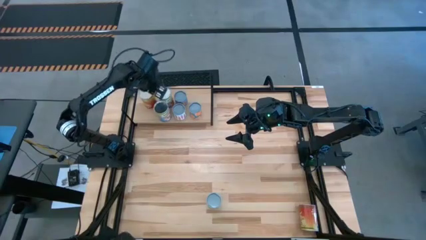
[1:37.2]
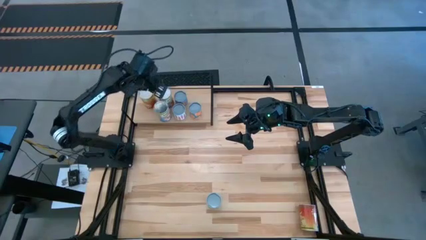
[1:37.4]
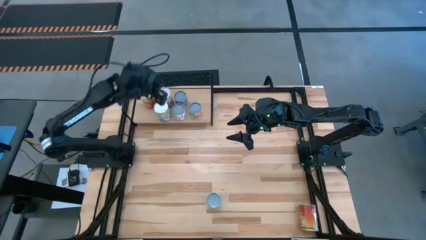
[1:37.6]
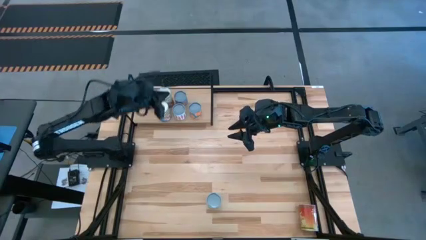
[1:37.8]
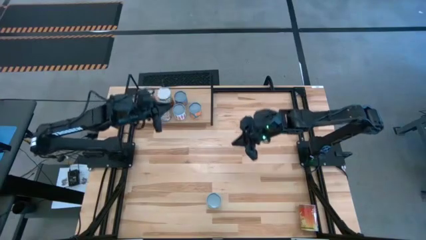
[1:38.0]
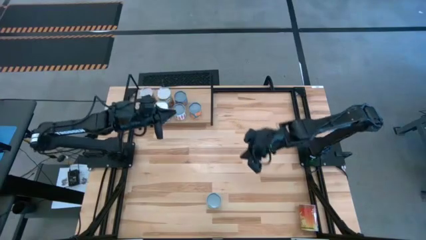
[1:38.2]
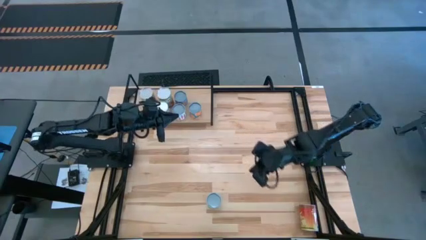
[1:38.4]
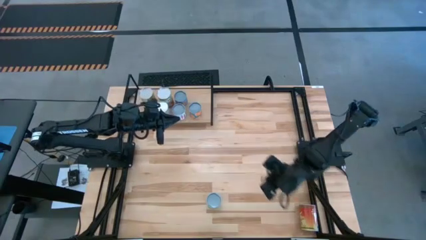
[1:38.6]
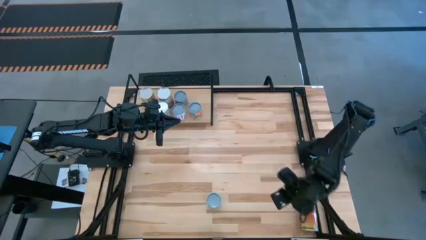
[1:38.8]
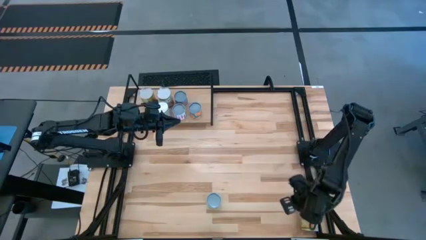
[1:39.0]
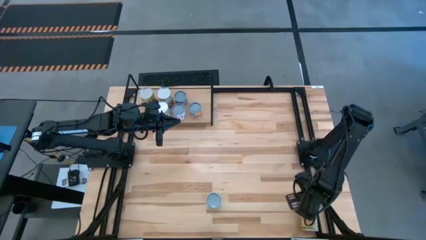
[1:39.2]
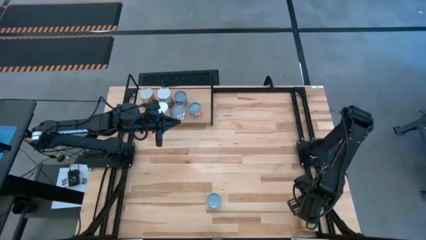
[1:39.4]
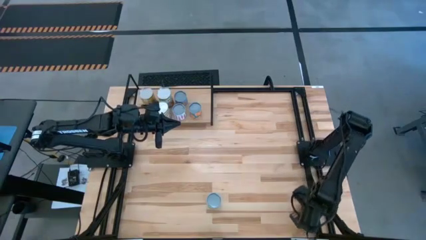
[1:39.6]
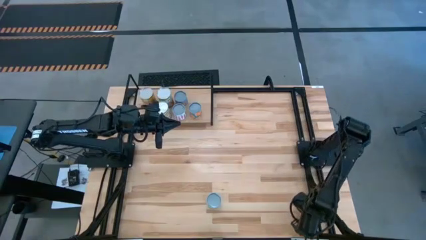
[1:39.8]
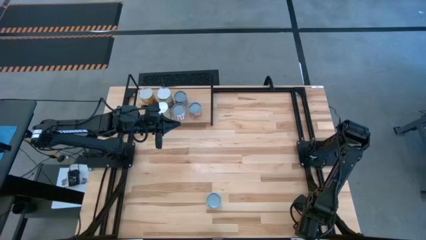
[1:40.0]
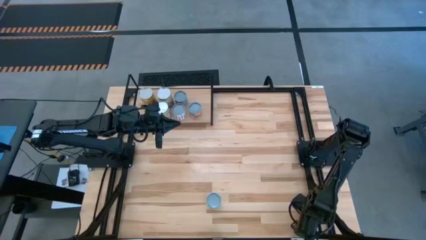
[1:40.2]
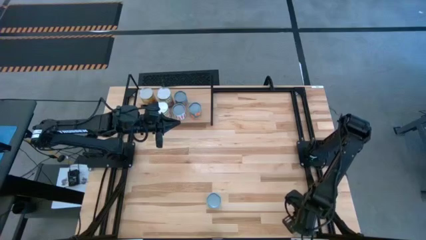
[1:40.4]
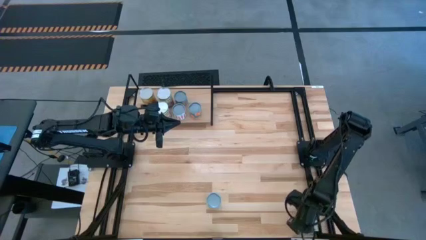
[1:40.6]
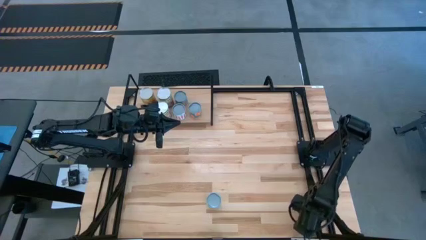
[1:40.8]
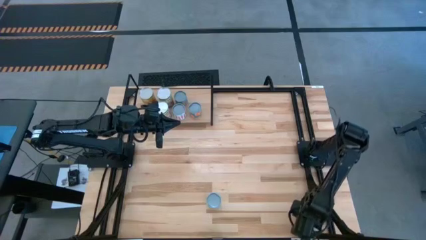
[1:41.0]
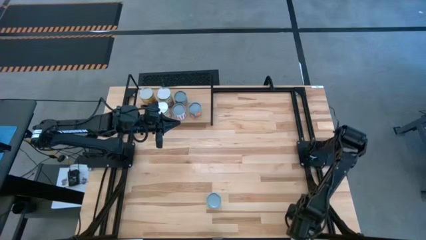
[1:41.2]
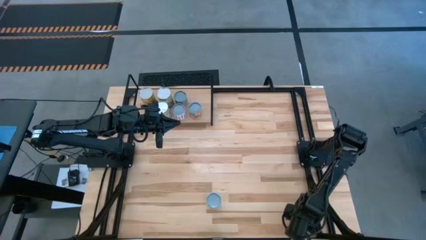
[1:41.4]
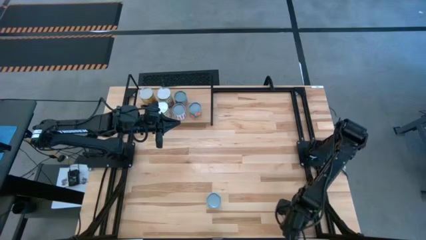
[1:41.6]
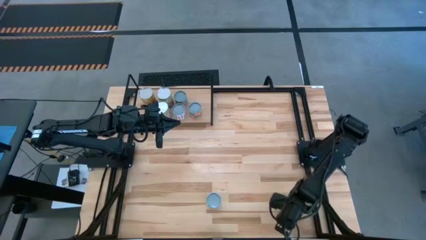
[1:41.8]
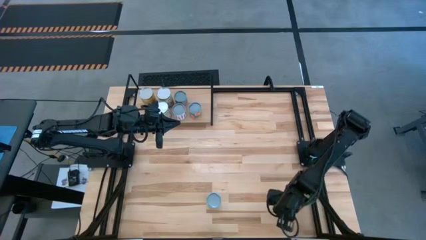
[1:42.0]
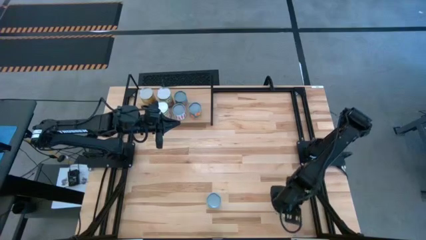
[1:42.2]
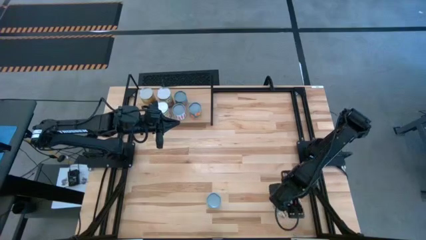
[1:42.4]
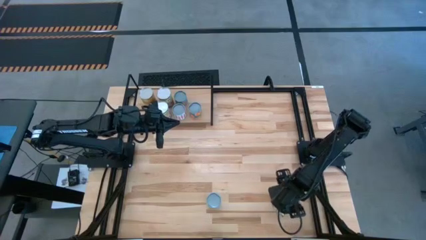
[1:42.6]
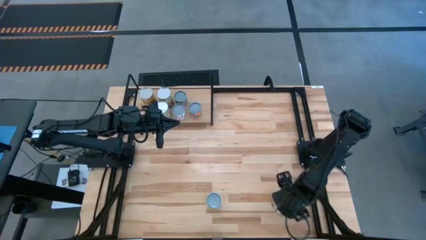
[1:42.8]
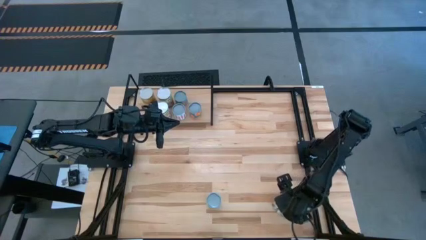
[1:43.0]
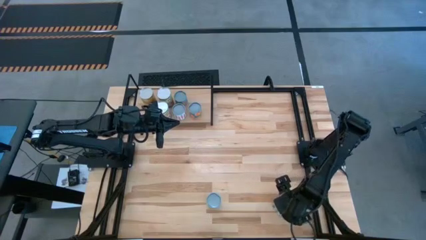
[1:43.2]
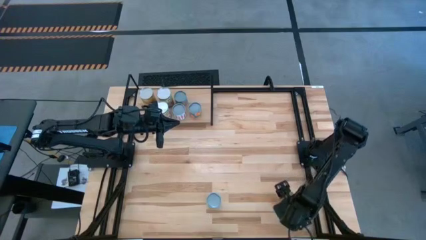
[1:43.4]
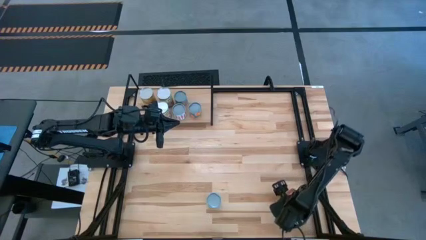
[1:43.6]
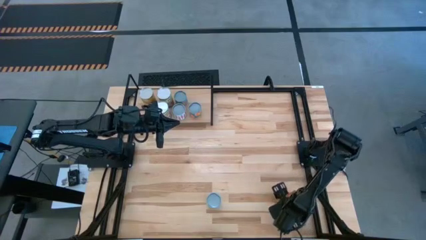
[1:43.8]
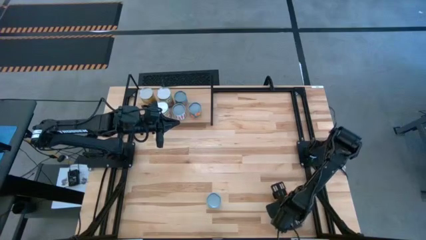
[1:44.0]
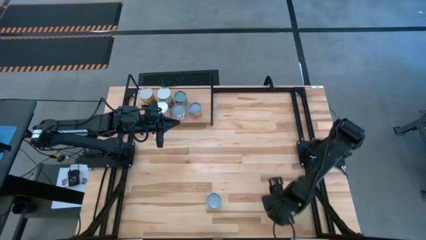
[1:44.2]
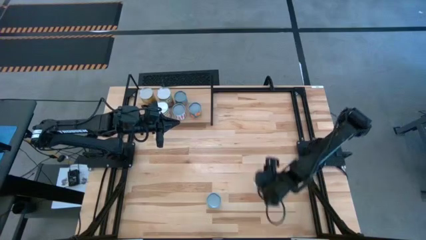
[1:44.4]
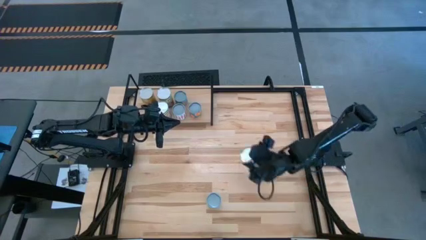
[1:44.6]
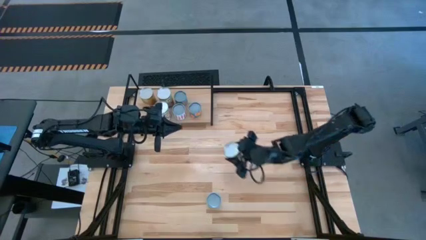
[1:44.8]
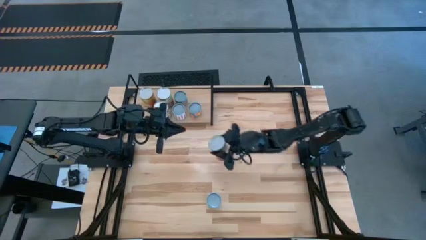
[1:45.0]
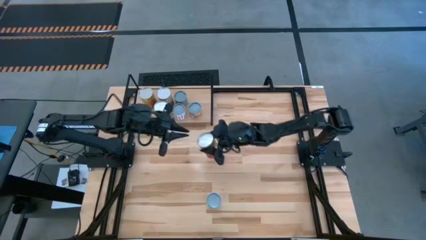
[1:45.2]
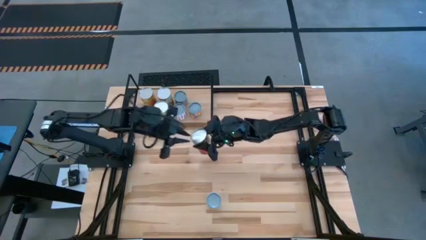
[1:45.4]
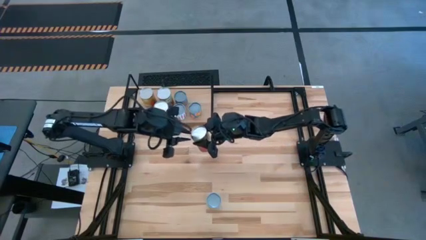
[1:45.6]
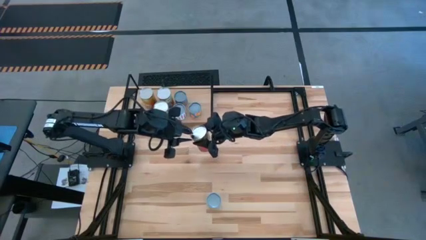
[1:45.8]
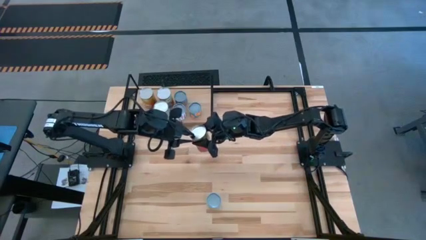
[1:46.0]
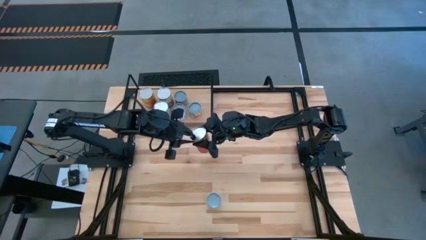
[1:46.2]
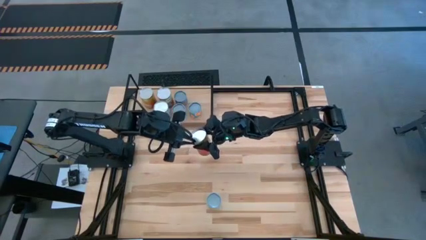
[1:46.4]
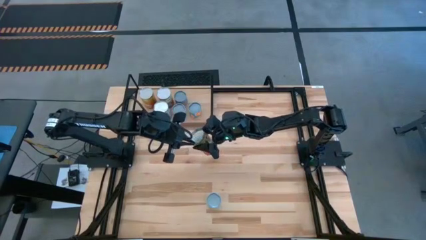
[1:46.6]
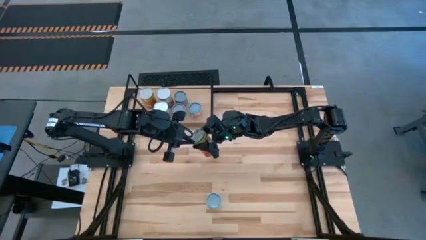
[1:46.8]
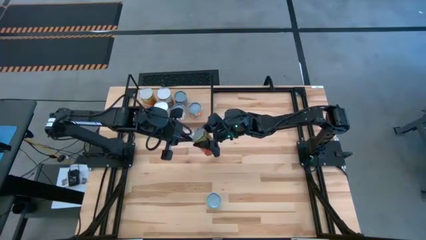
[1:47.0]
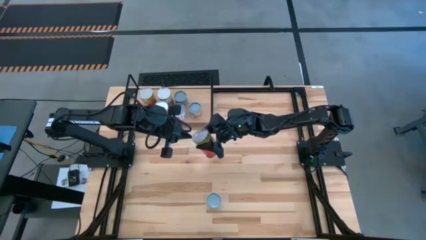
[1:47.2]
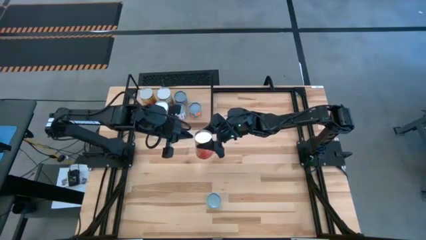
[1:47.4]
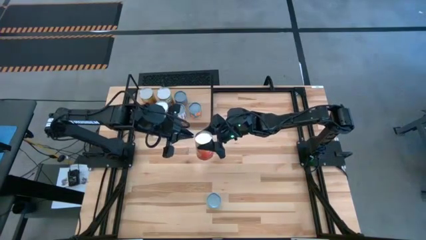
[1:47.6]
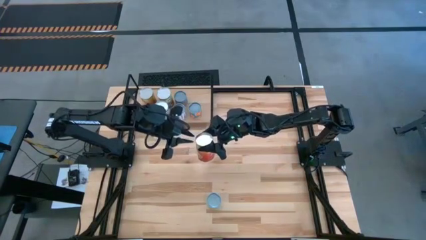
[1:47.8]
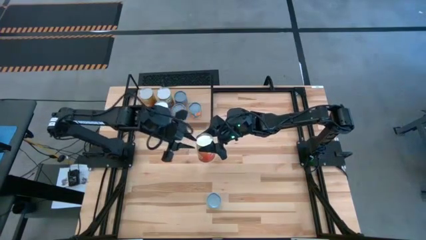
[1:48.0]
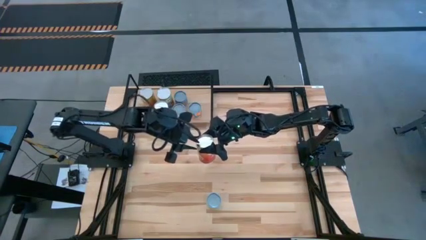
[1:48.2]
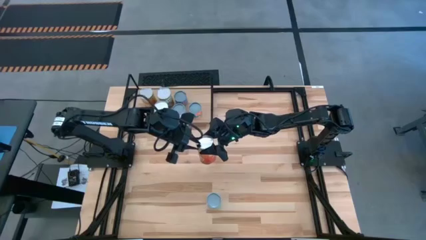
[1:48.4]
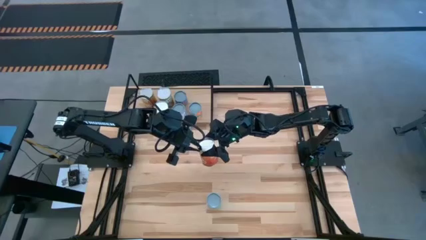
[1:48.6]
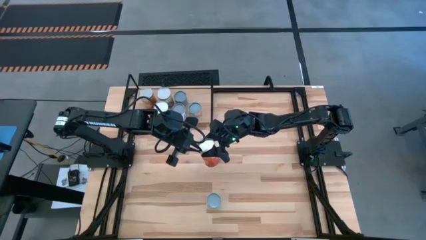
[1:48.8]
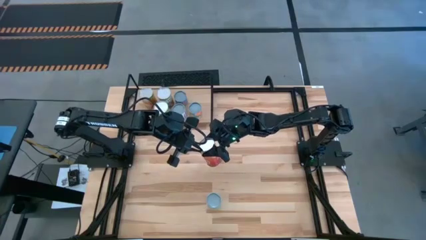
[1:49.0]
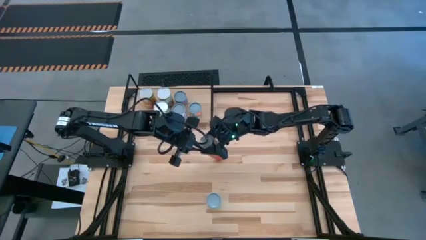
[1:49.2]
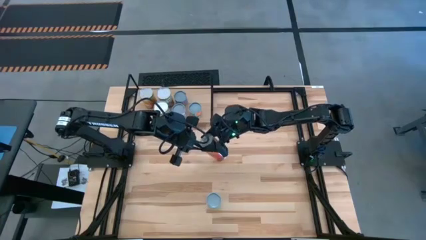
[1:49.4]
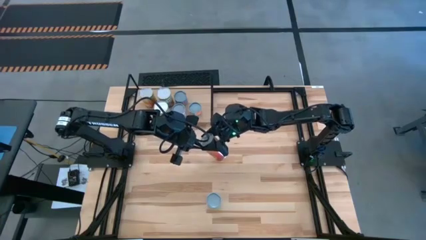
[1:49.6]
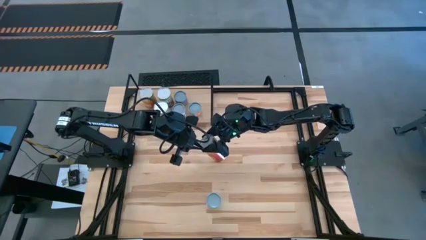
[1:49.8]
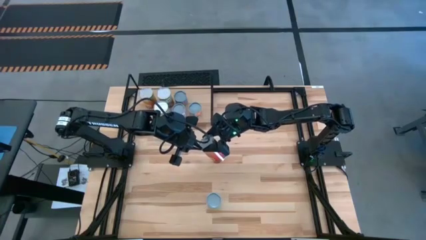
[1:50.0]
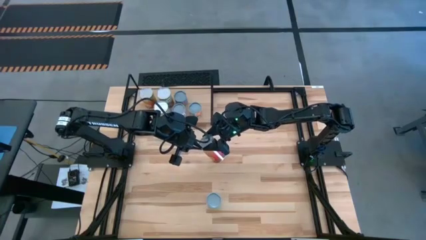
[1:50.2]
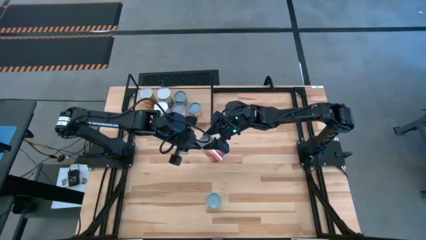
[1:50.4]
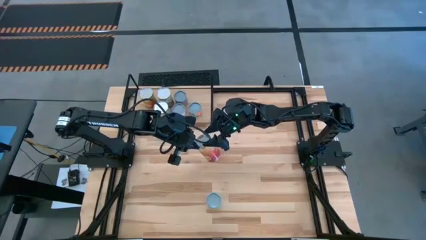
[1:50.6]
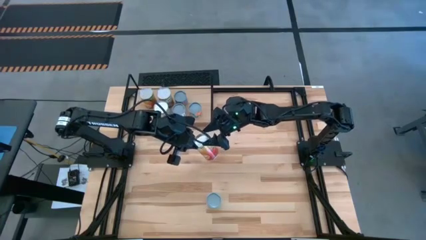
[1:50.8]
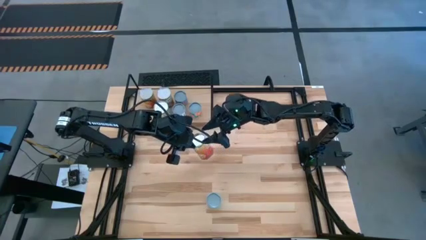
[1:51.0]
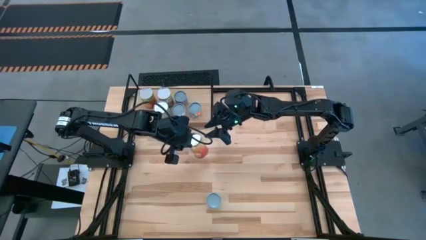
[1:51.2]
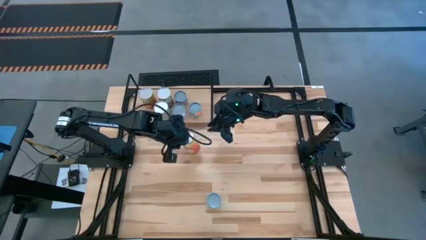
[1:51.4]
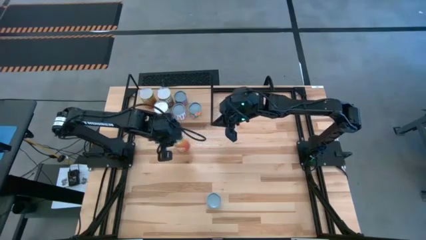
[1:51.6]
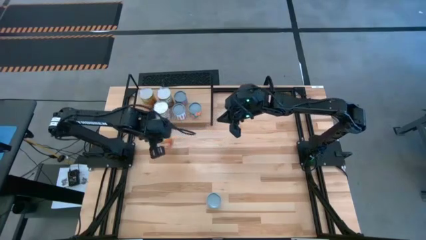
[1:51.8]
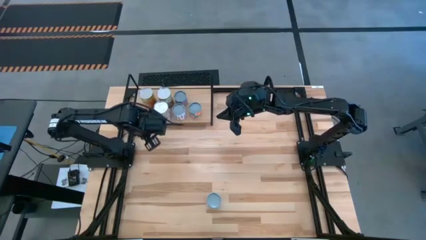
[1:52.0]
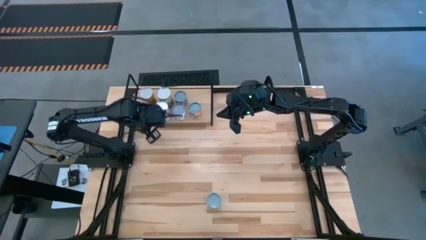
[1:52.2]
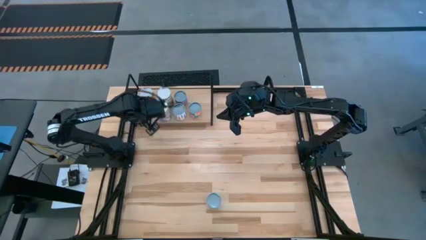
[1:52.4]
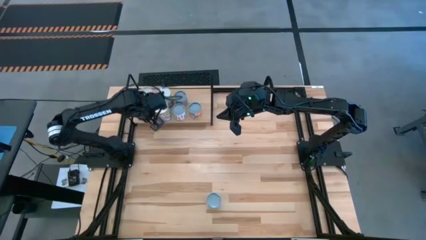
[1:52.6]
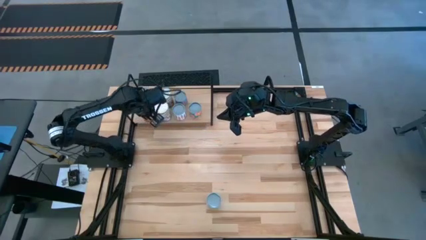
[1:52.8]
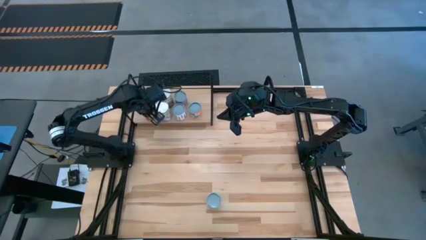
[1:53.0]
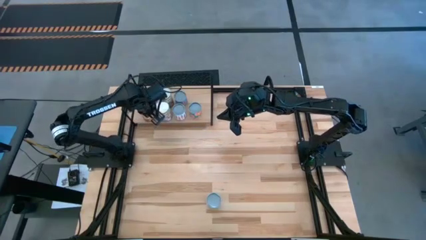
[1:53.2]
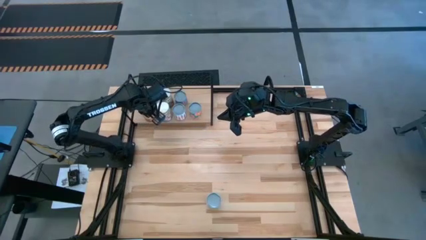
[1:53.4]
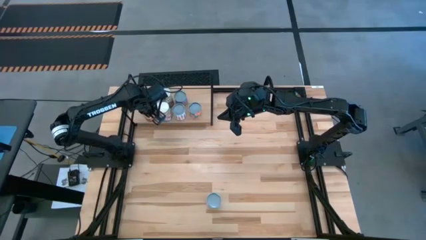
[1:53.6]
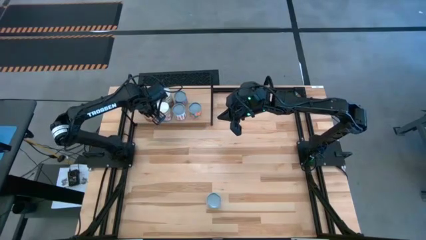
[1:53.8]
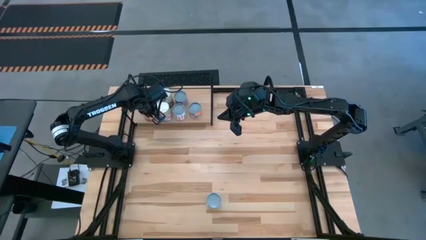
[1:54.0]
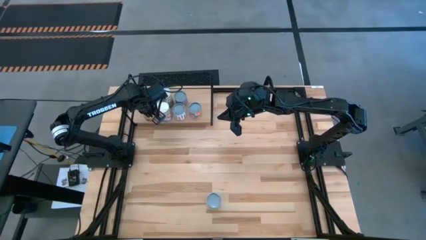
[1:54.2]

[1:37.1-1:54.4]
Task: Pick and place cans onto a shelf
Put the large canned corn on the shelf
